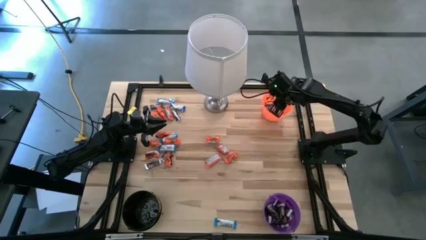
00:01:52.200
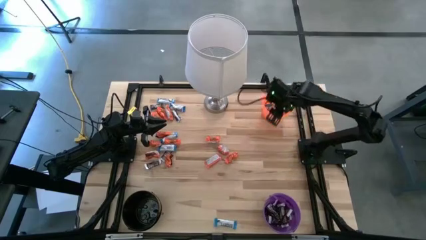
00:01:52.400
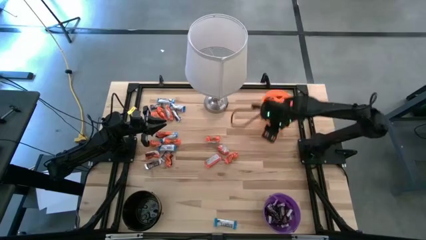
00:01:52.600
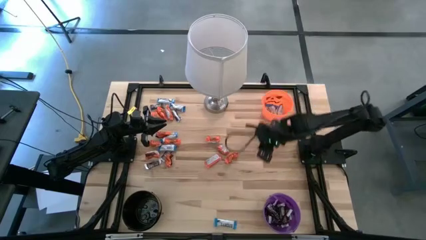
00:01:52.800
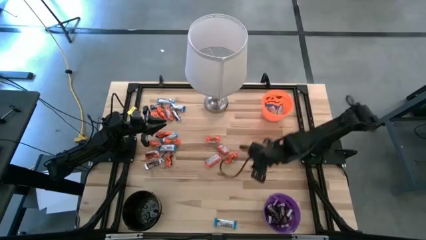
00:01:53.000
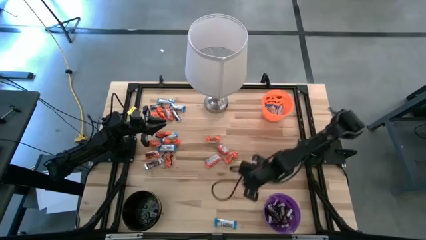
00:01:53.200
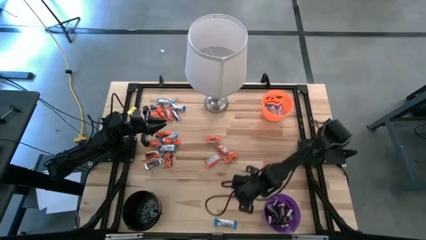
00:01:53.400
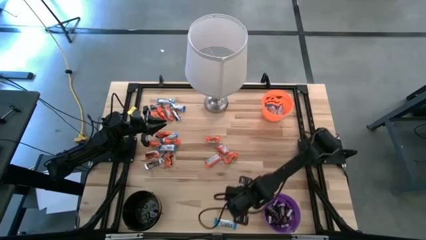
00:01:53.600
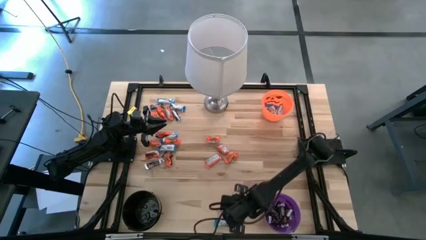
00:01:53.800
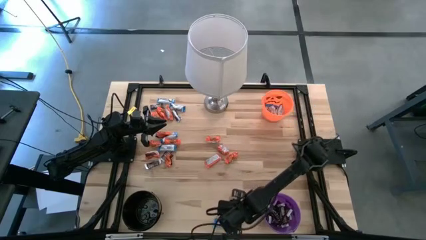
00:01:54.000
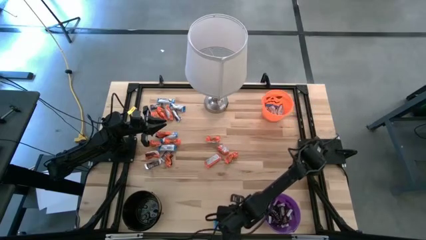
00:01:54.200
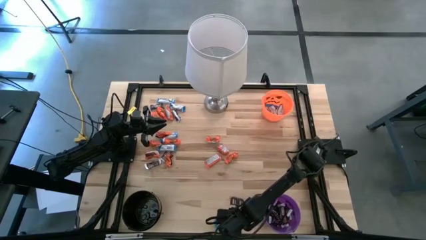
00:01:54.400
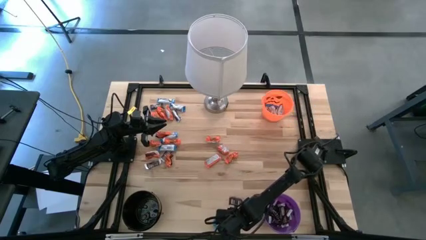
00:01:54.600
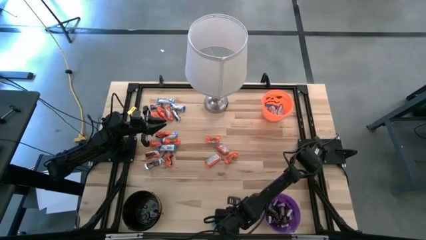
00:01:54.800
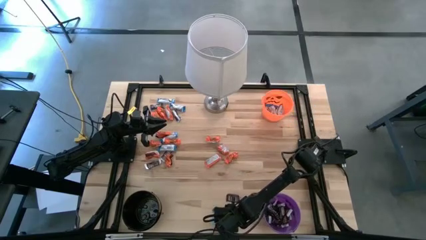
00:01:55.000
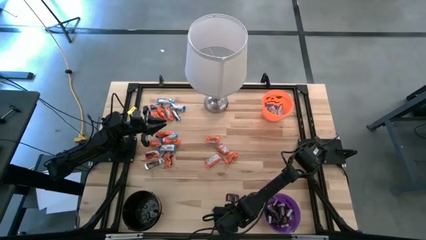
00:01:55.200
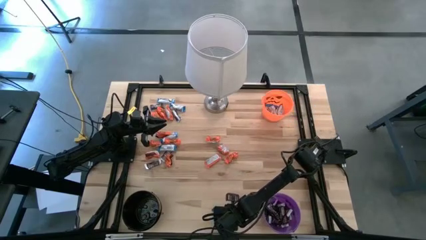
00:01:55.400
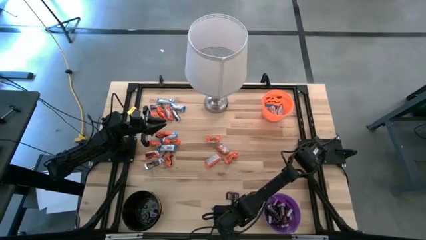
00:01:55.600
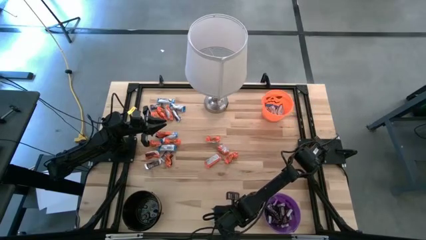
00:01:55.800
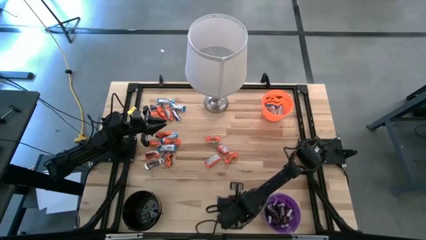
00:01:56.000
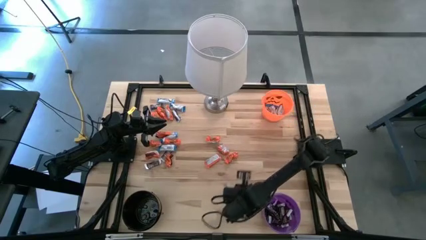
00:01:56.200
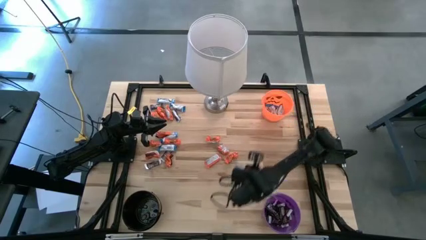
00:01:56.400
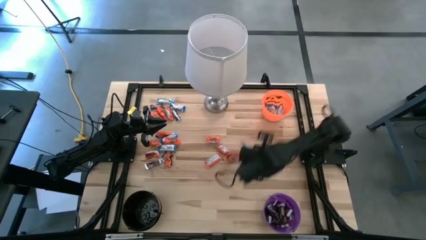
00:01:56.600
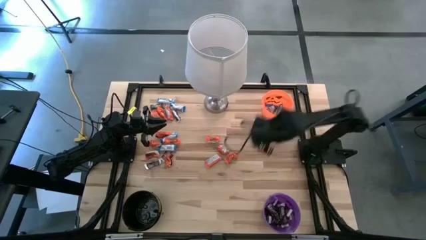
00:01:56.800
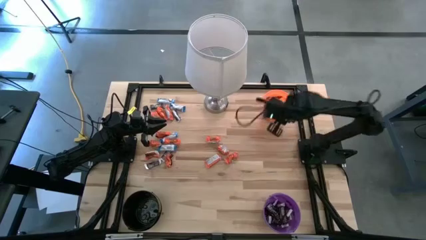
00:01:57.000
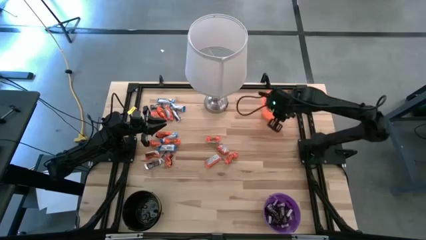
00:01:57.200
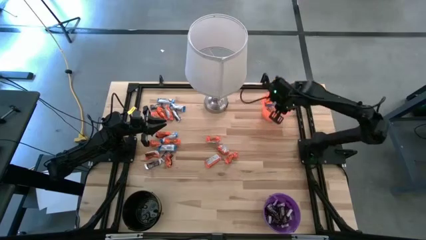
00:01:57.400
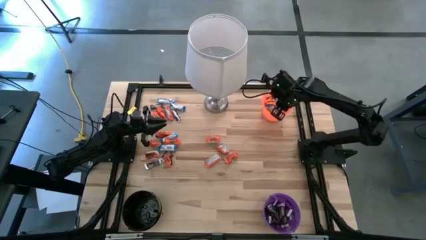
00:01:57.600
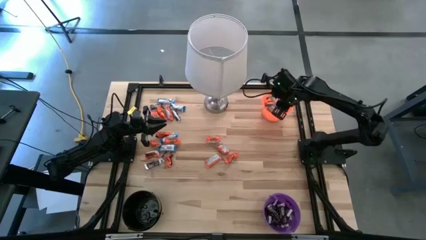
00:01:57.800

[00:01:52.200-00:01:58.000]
Task: Sort candy
Put the orange chocolate bar into the black bucket

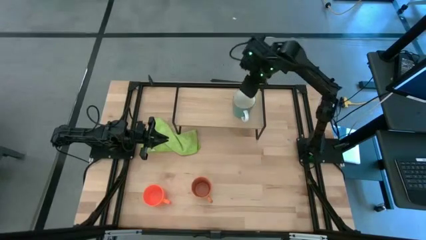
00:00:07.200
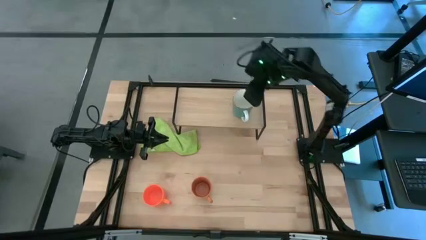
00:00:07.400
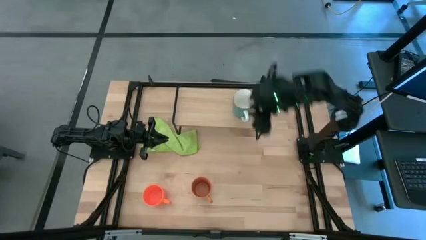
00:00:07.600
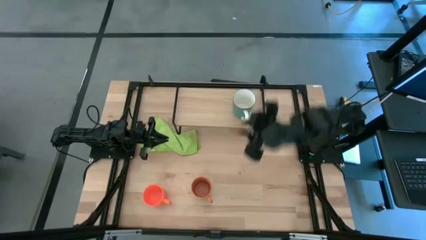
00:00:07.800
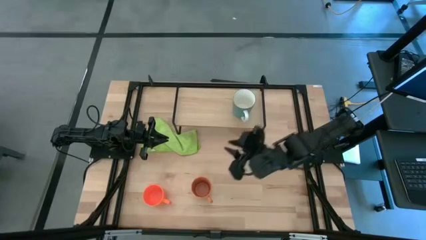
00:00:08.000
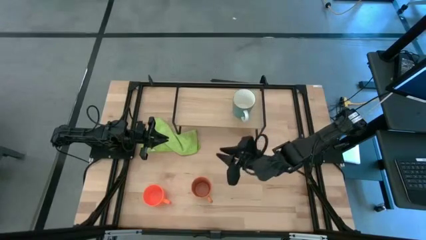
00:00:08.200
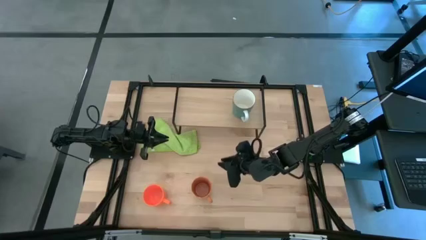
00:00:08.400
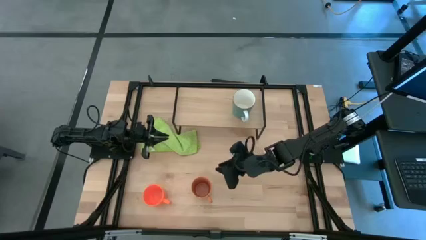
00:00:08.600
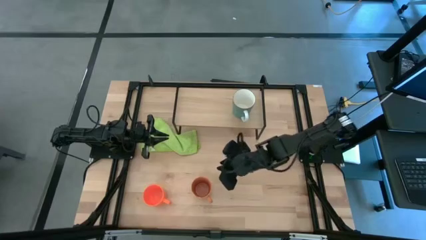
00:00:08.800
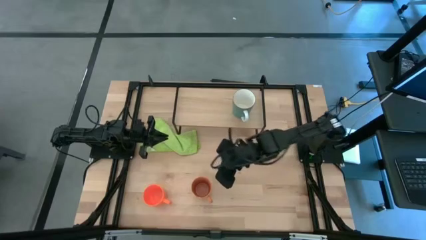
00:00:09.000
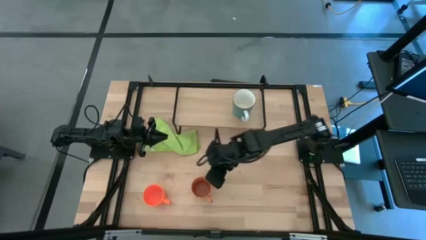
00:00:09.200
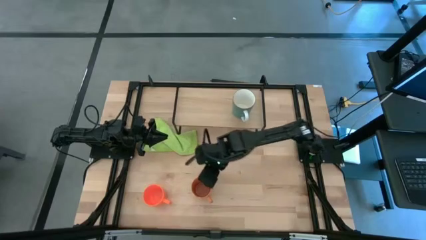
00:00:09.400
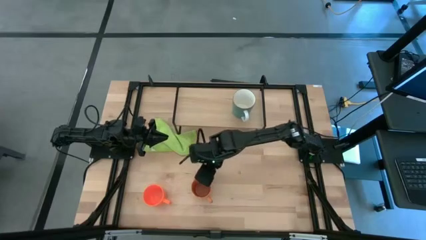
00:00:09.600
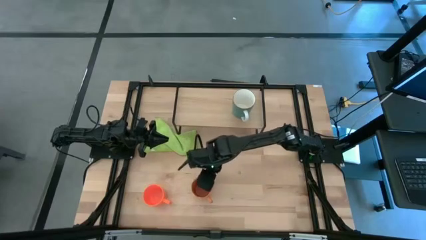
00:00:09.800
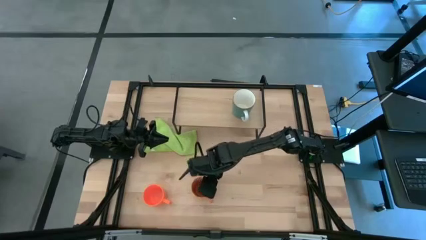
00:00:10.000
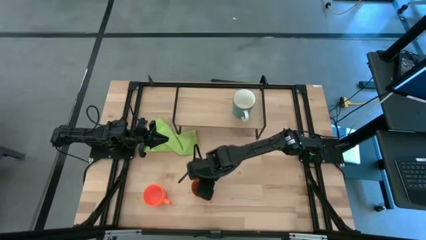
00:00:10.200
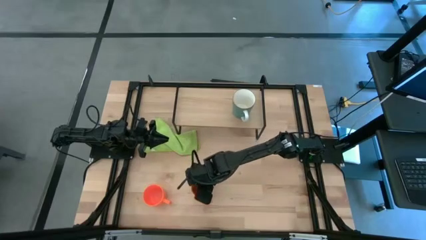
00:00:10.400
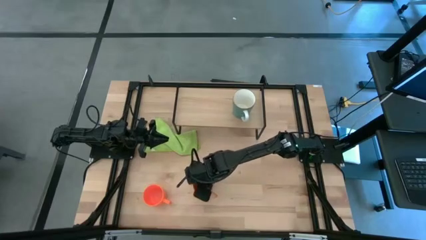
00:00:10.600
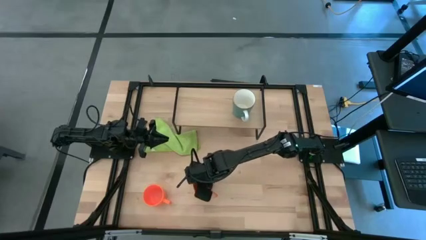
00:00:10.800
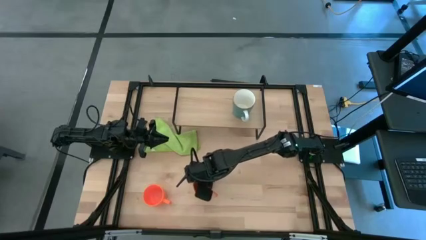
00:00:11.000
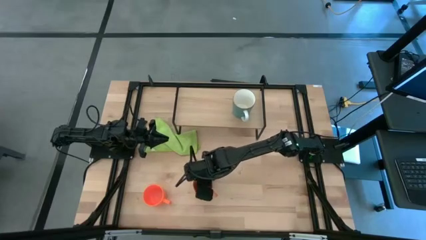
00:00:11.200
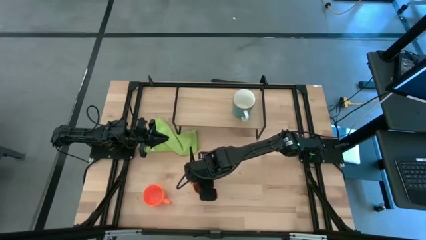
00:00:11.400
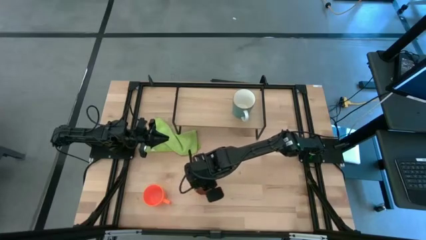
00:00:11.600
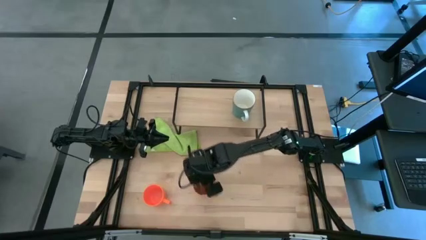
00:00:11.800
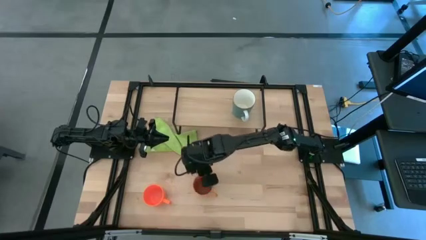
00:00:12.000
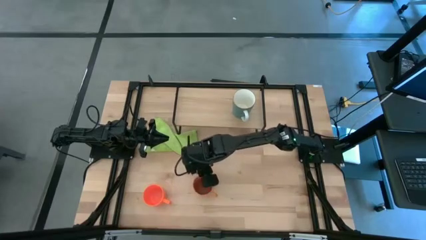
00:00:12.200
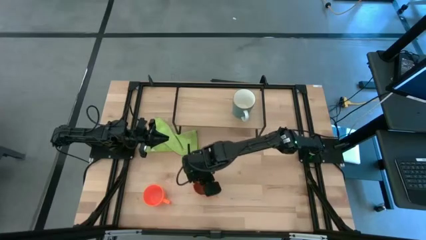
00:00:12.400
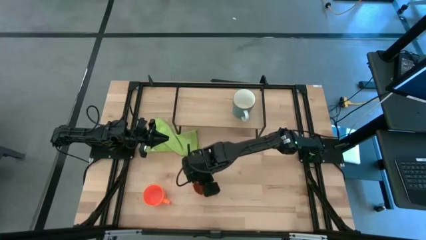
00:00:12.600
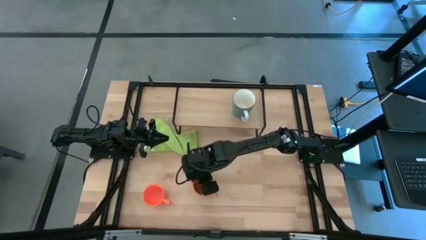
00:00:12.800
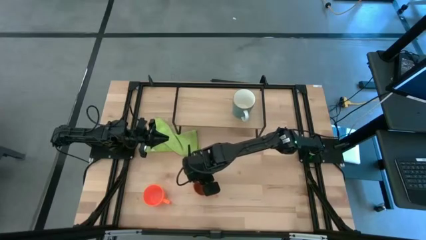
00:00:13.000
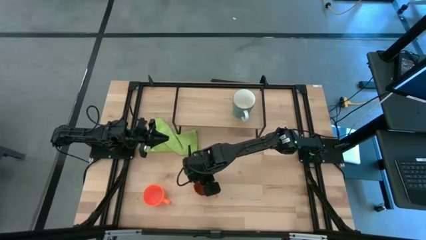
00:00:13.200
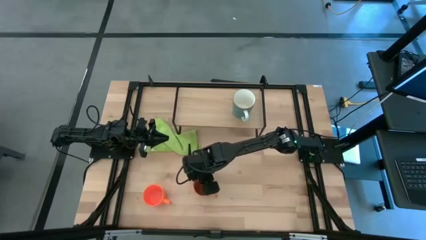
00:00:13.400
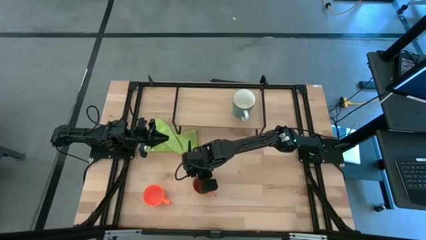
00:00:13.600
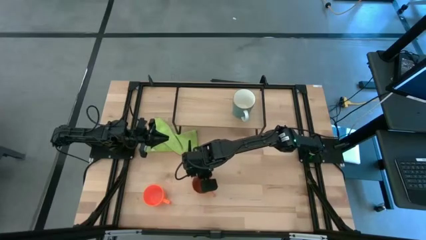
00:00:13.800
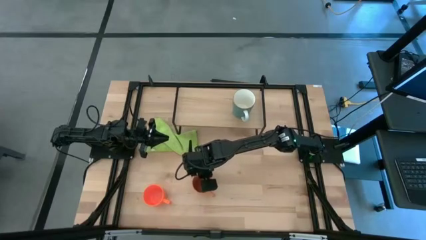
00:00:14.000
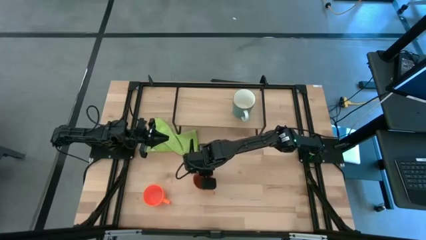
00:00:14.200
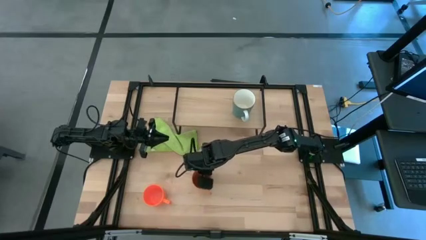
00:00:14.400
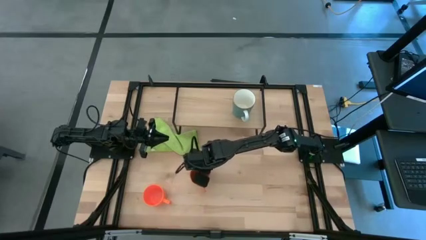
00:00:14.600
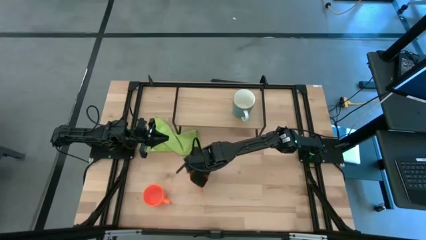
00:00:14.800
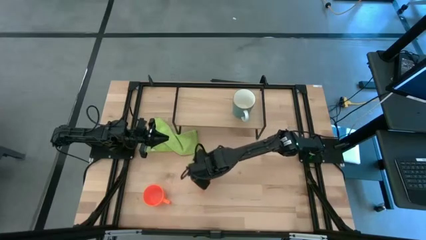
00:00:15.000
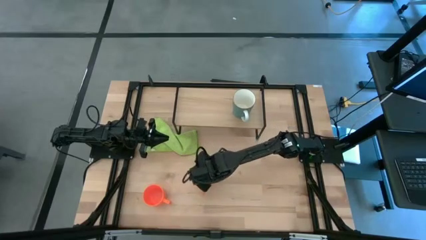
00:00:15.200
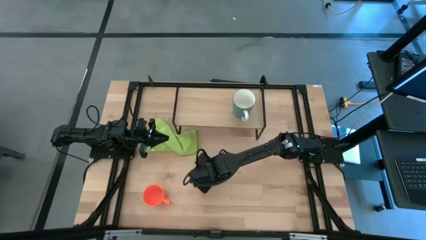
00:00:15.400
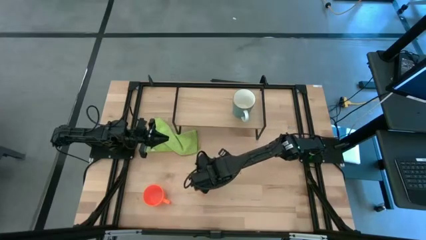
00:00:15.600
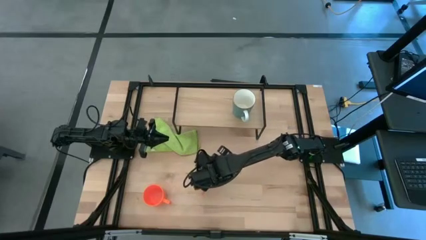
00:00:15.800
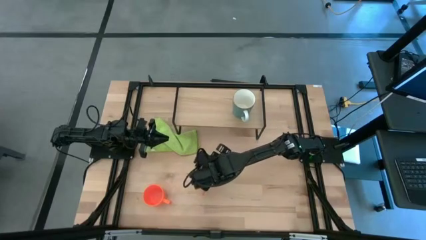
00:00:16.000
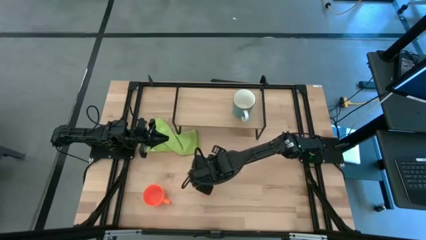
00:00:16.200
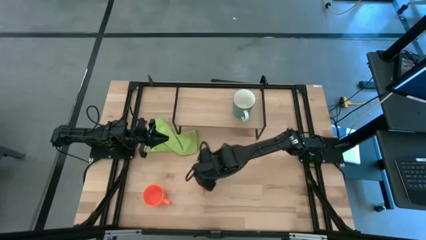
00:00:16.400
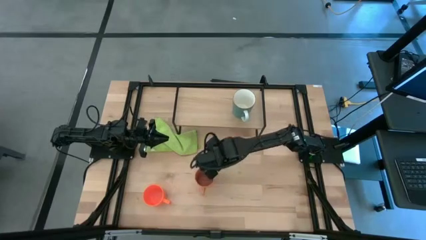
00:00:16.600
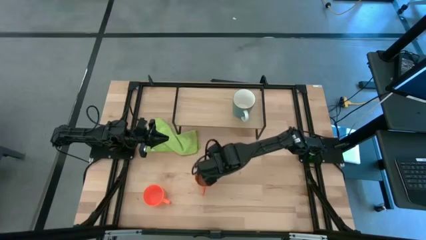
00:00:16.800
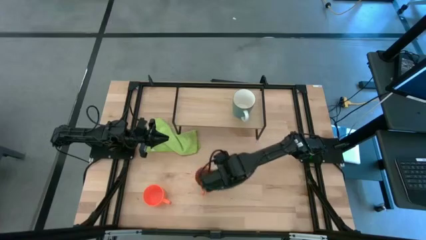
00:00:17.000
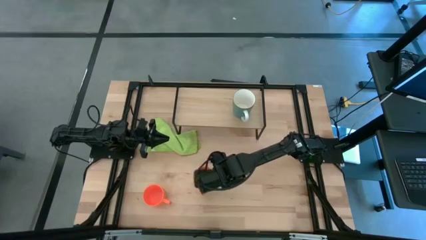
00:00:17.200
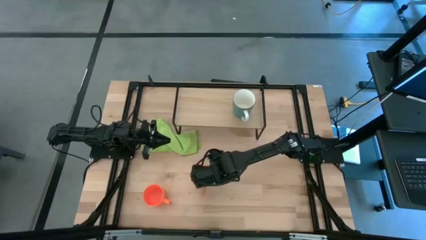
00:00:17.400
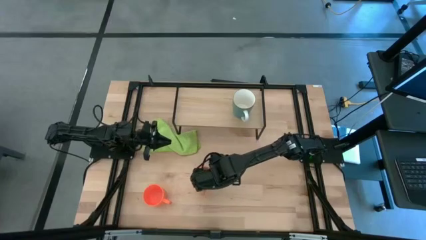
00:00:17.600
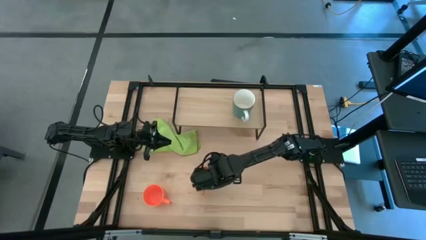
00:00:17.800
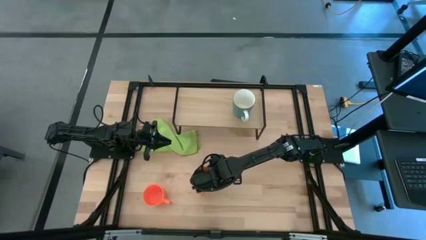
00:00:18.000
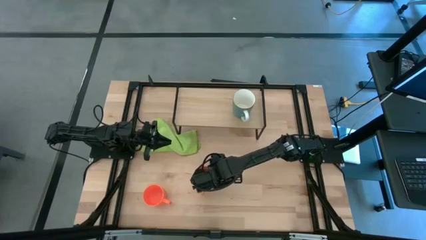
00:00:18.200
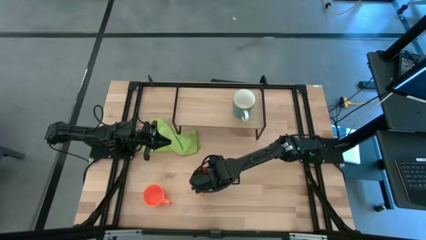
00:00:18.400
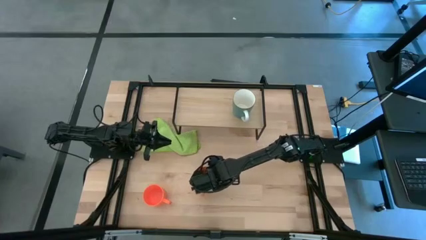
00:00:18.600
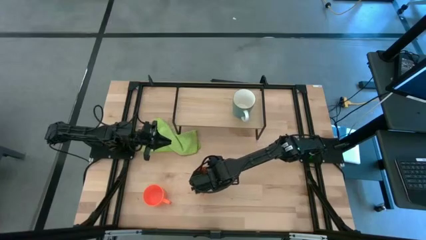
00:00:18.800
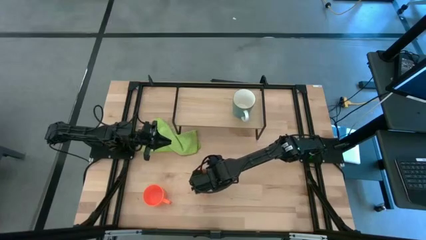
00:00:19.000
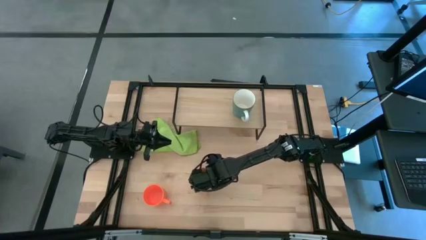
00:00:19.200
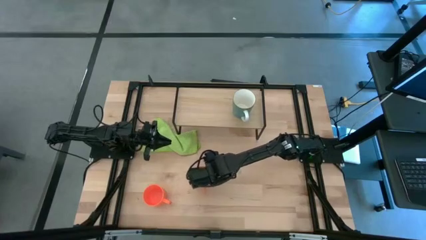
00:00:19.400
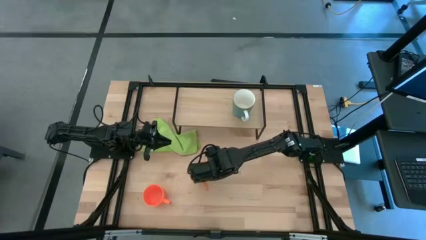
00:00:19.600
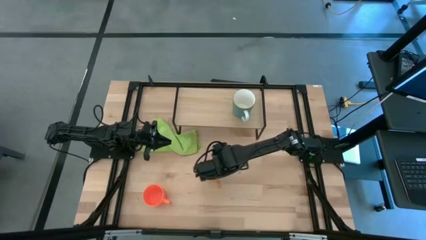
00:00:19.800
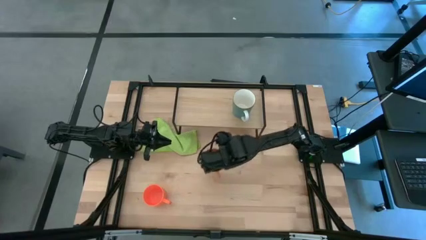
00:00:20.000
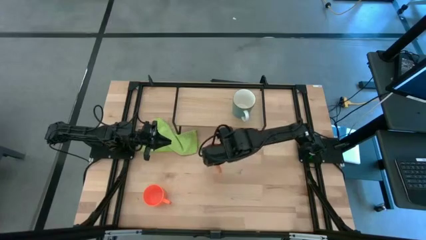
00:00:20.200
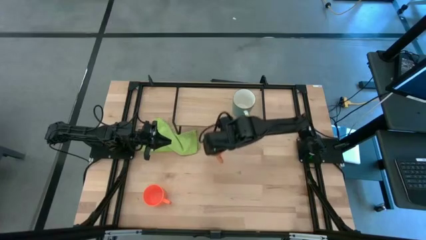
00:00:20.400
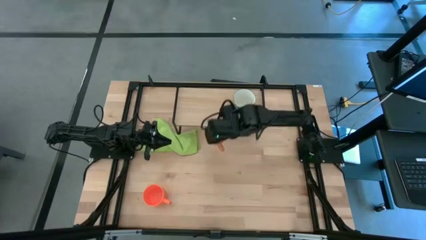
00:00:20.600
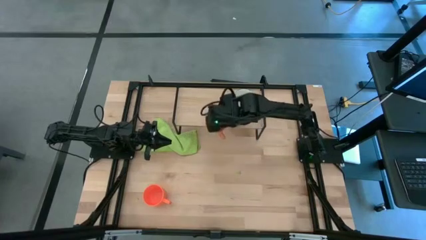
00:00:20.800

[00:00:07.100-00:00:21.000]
Task: Stack small to large cups/mugs on shelf
Put the light orange mug on the shelf
